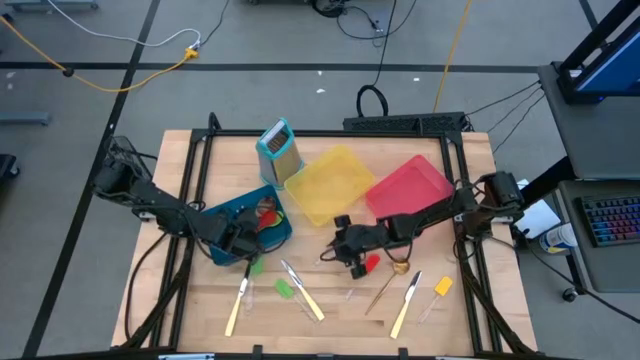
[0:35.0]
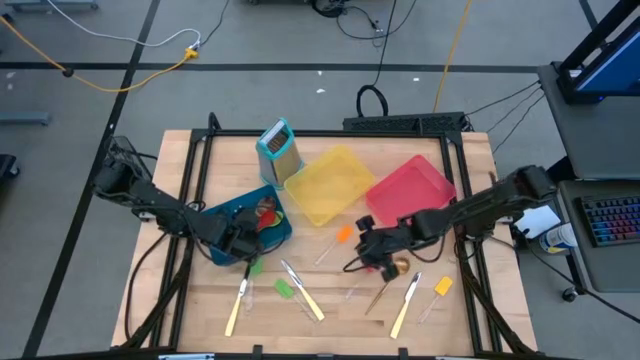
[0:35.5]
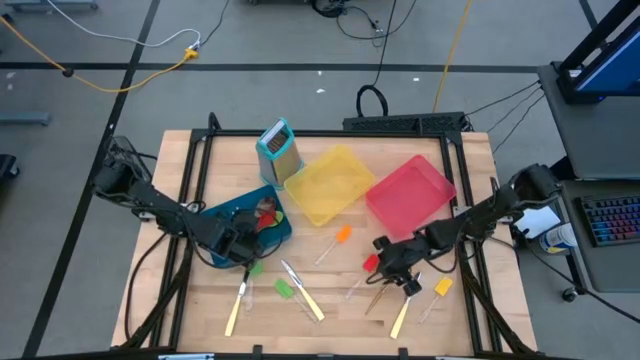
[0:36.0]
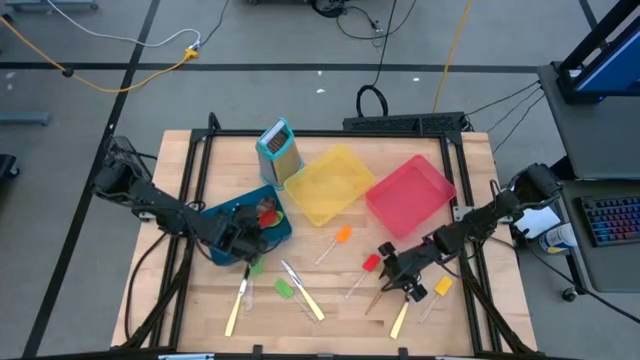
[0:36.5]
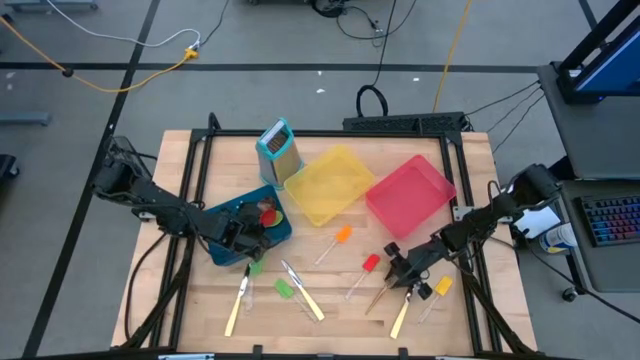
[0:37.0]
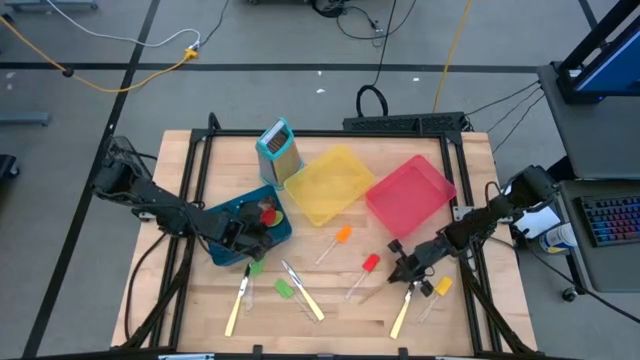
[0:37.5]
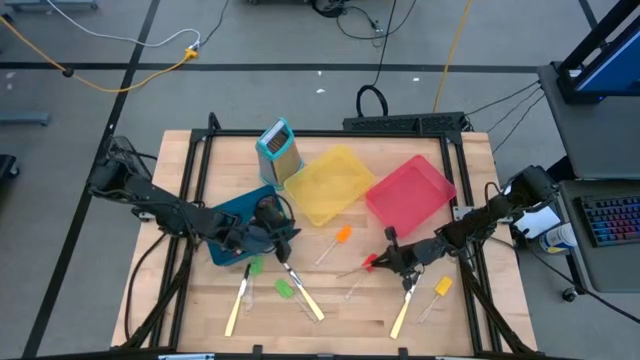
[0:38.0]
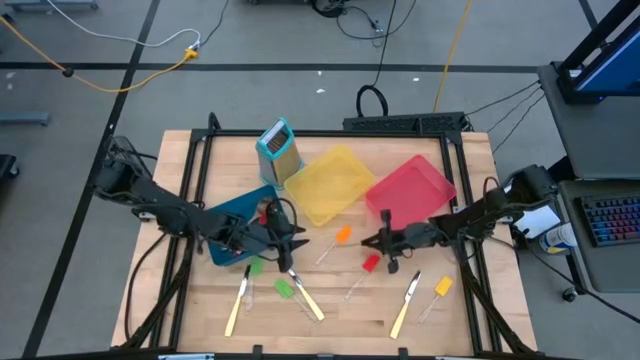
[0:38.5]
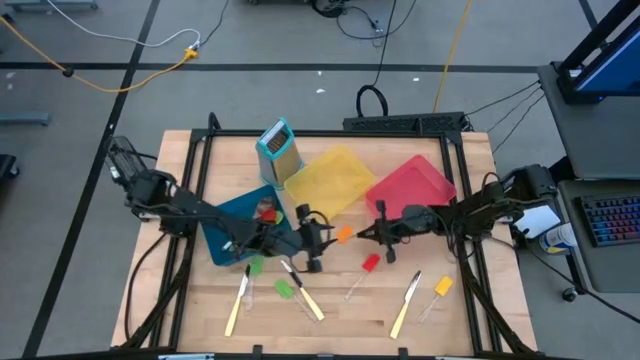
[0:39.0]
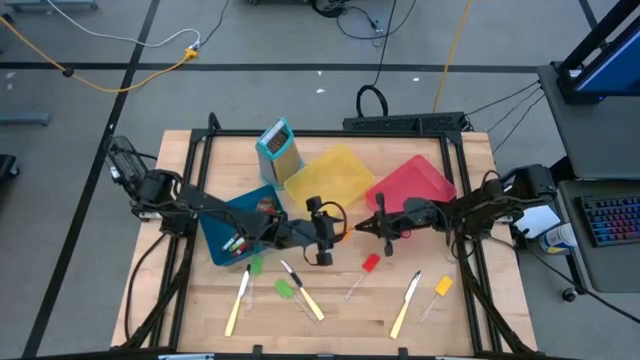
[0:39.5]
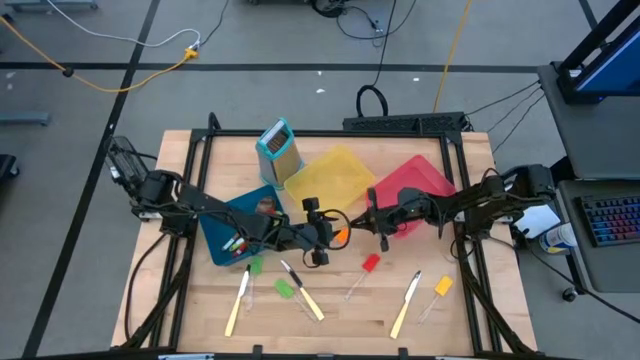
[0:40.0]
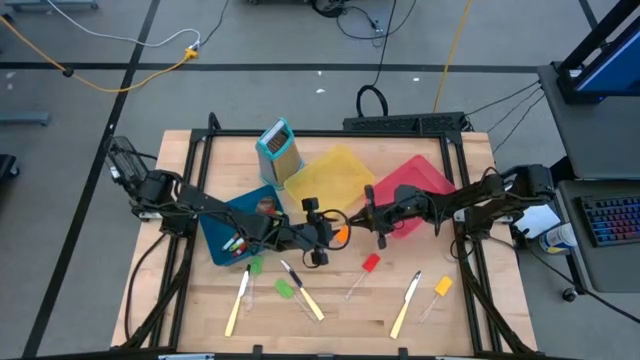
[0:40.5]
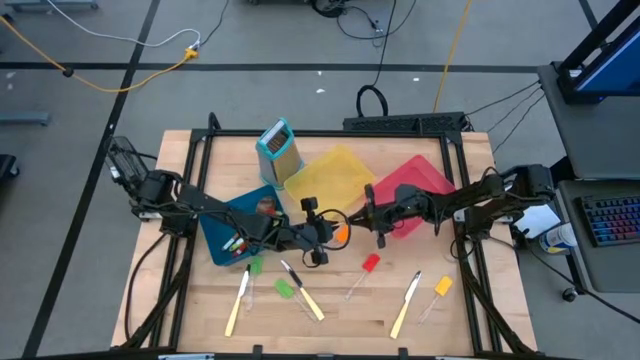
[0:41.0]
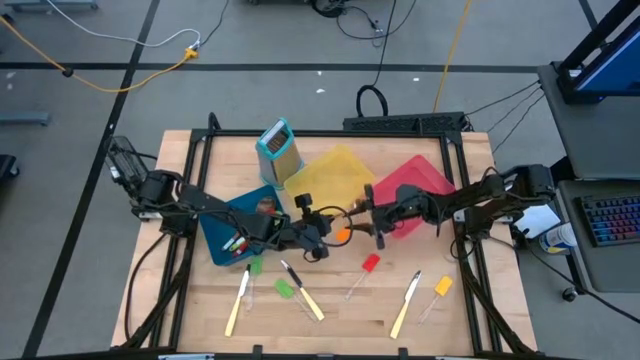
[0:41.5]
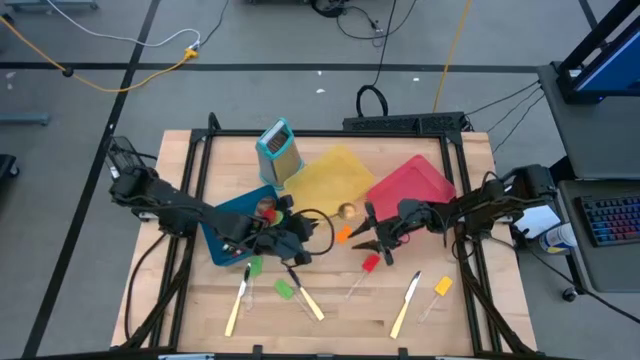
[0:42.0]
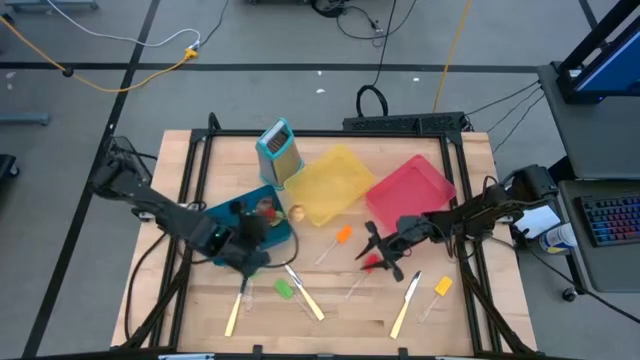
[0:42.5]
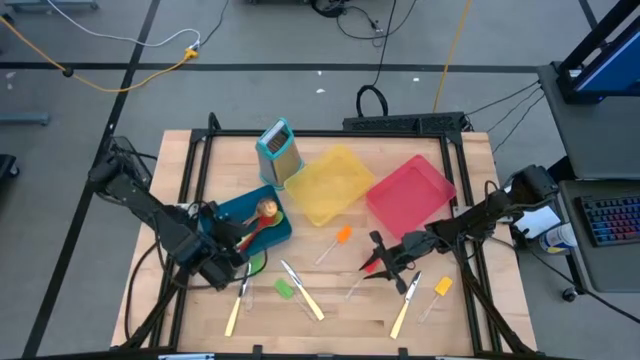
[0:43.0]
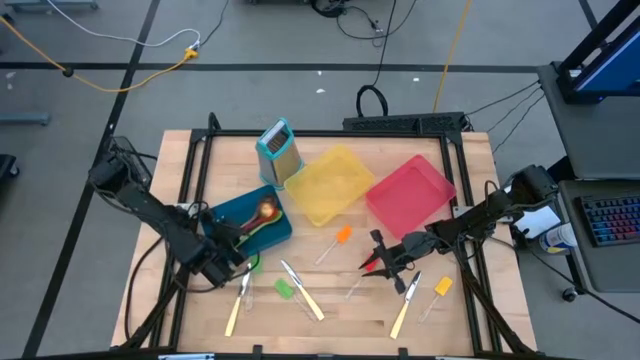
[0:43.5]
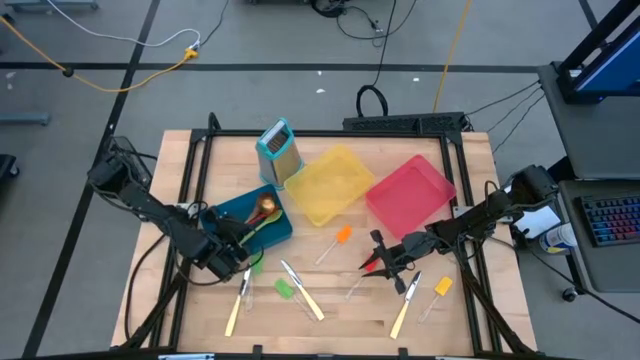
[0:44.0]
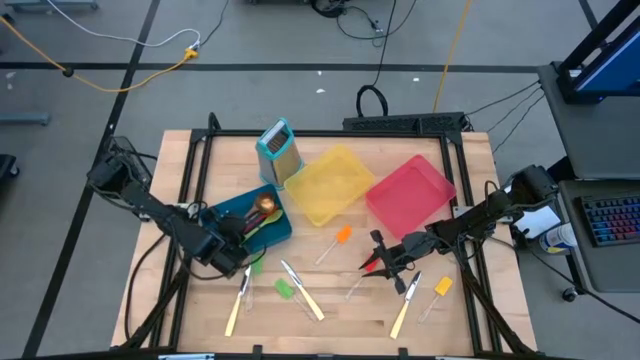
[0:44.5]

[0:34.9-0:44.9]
Task: Pick & Place Kitchen Items
Put the gold serving spoon into the blue bin

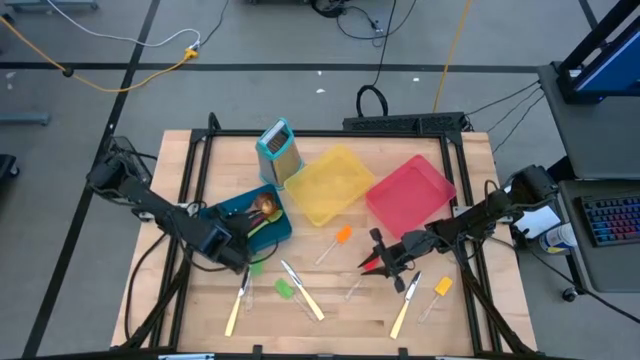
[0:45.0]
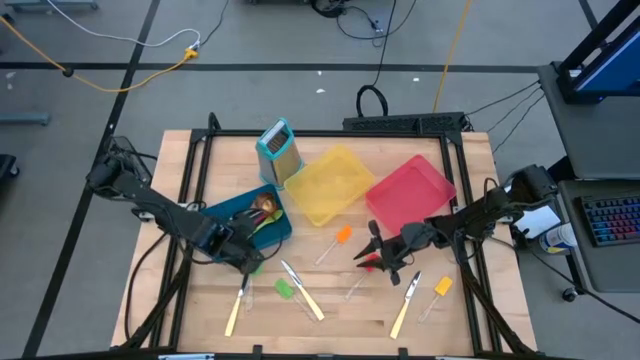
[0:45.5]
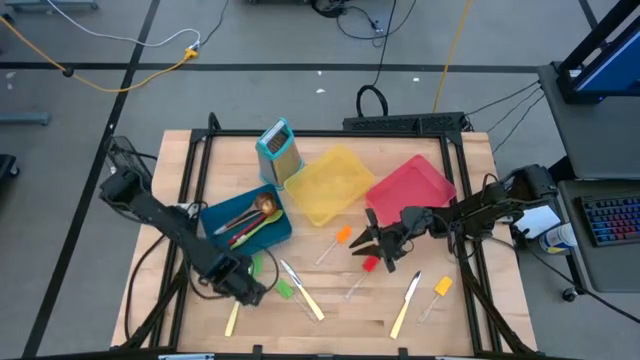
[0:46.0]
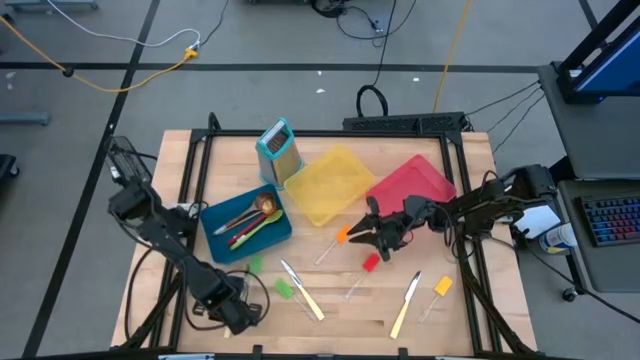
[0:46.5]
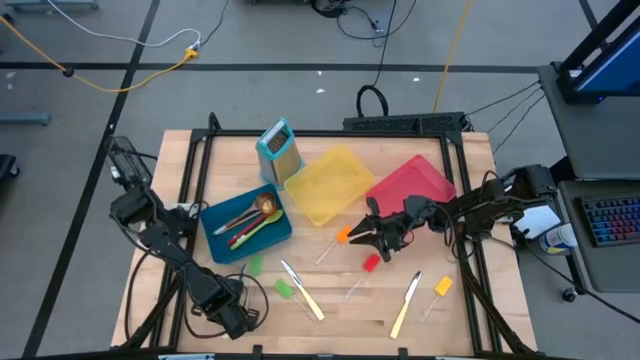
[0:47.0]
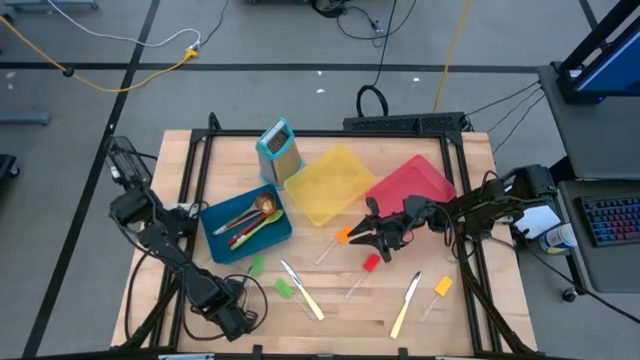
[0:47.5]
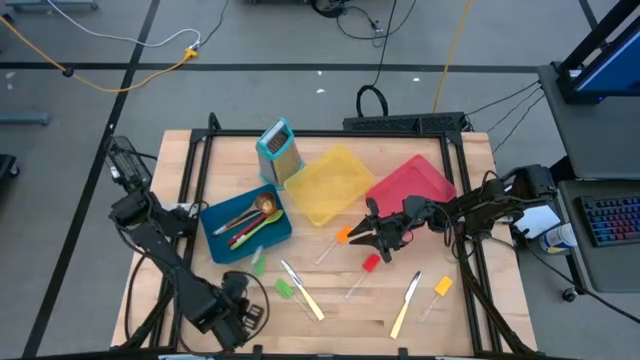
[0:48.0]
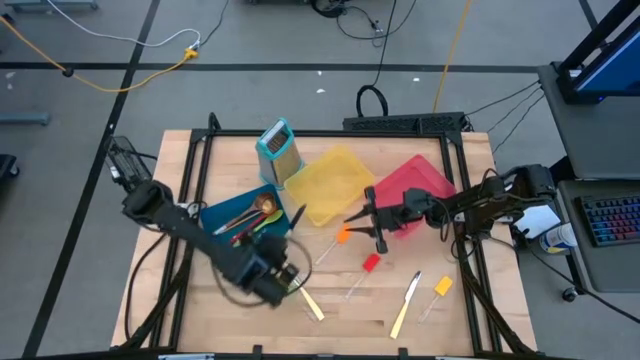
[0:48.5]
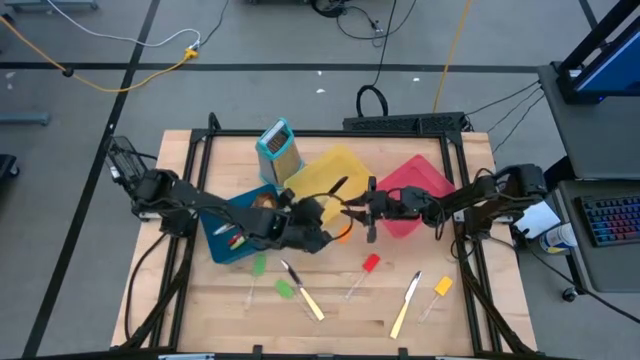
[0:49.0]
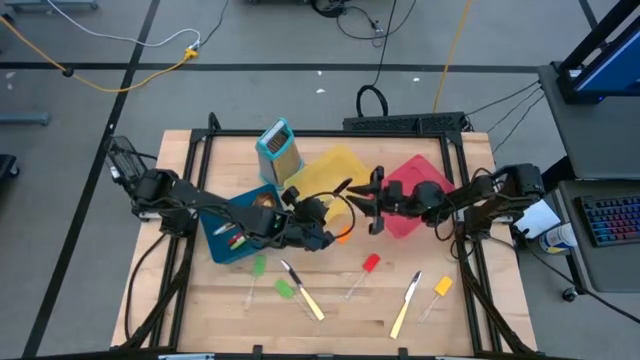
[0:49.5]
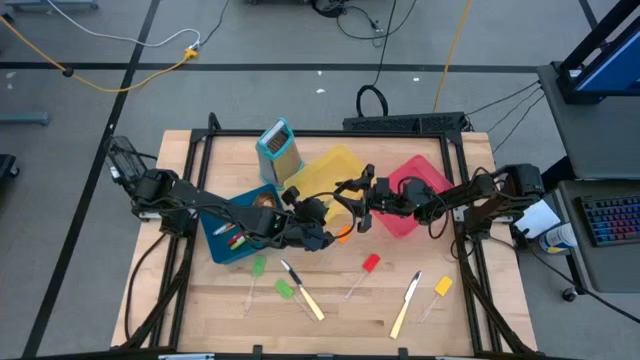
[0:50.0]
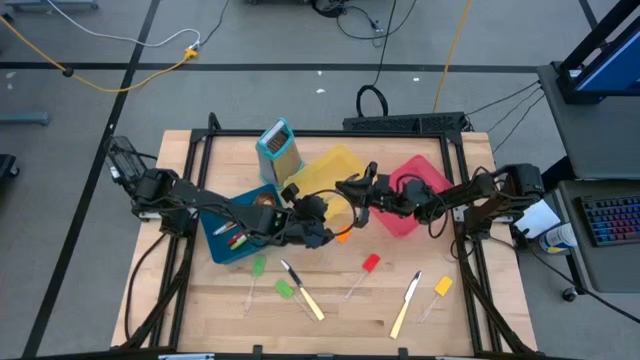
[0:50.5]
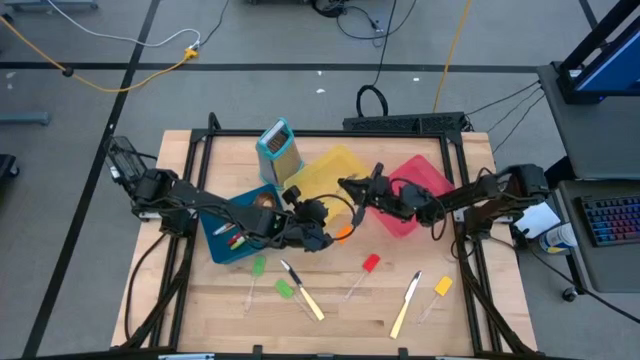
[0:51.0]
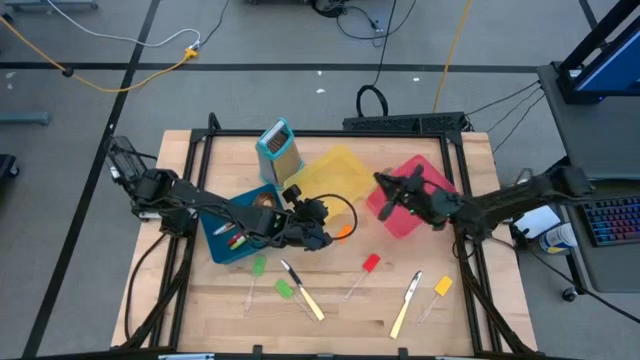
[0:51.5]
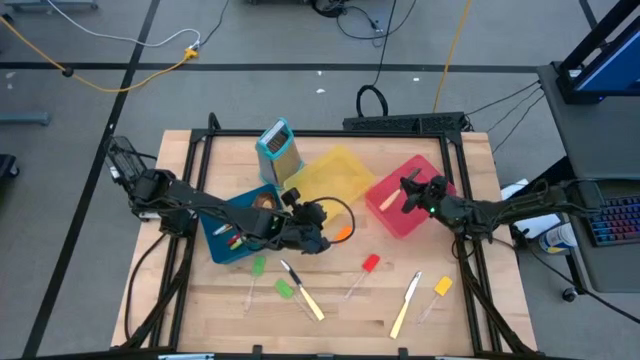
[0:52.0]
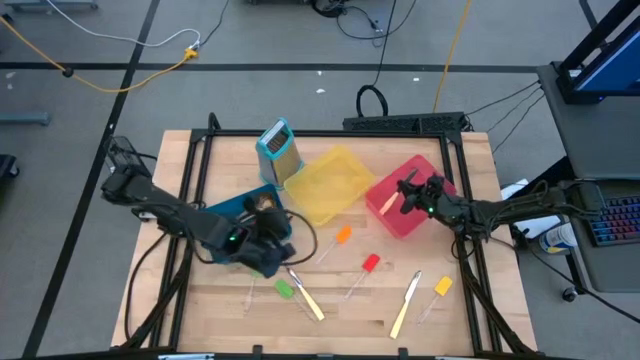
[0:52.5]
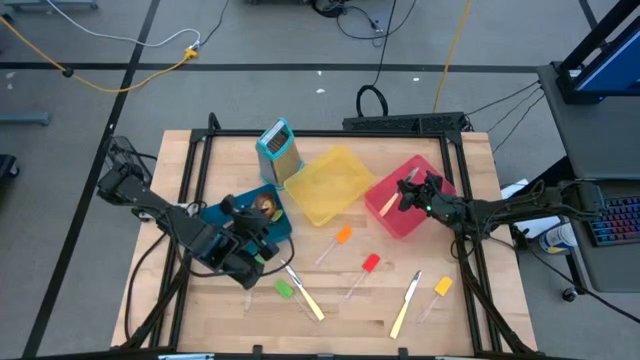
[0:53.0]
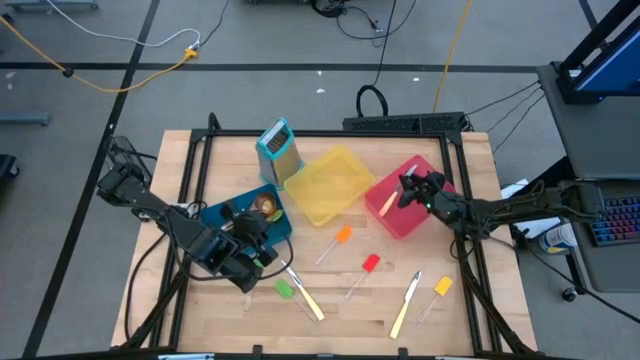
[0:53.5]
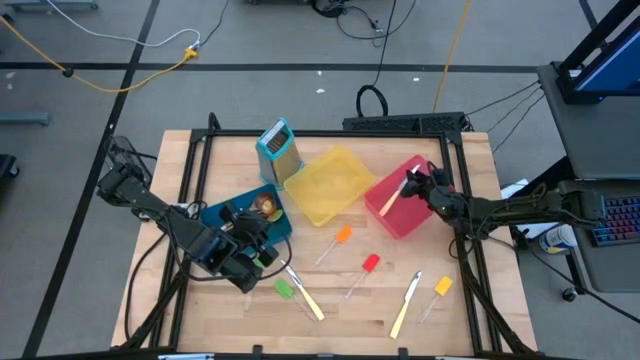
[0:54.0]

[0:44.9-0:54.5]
Put the yellow table knife into the red bin

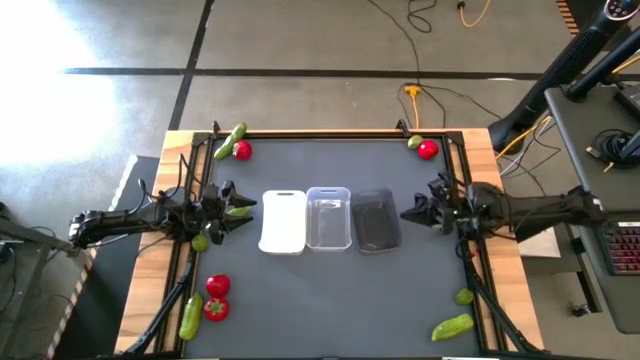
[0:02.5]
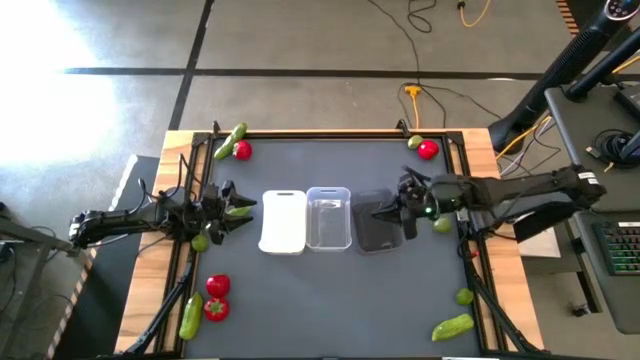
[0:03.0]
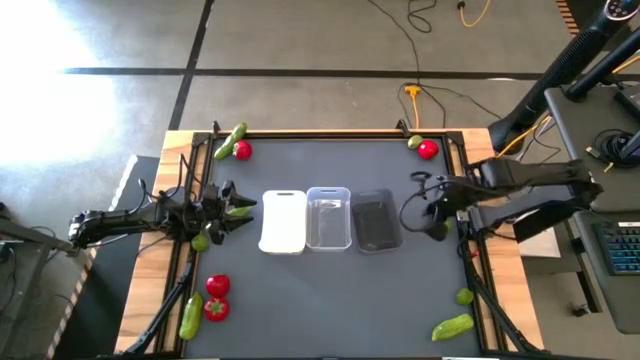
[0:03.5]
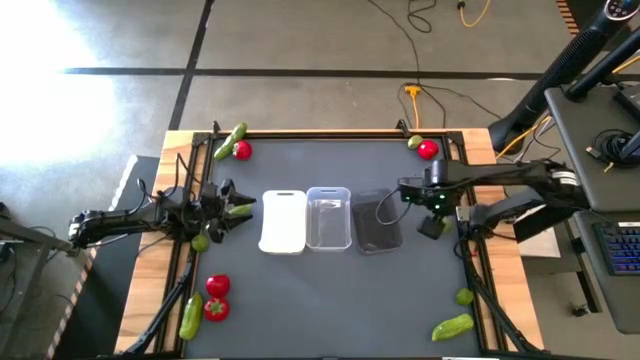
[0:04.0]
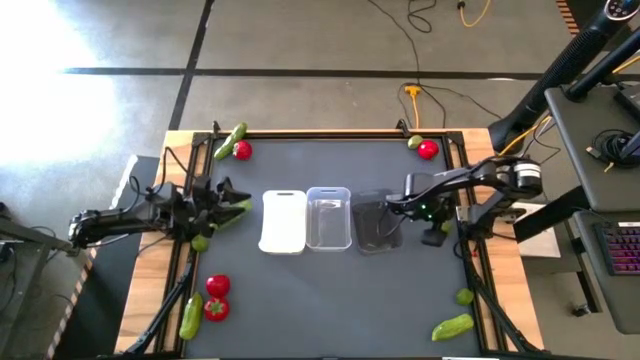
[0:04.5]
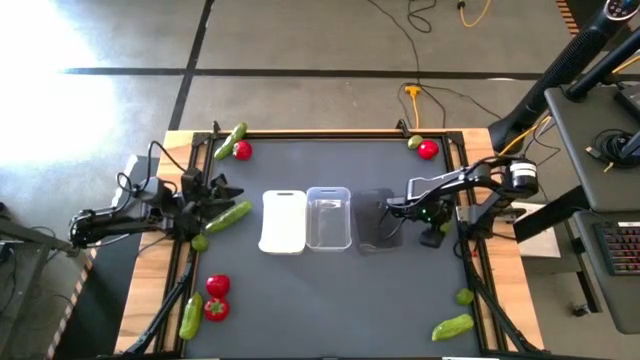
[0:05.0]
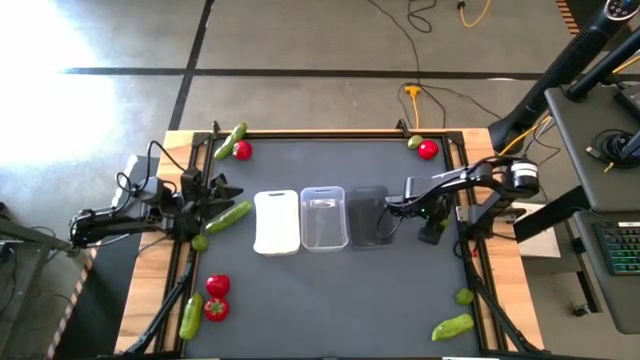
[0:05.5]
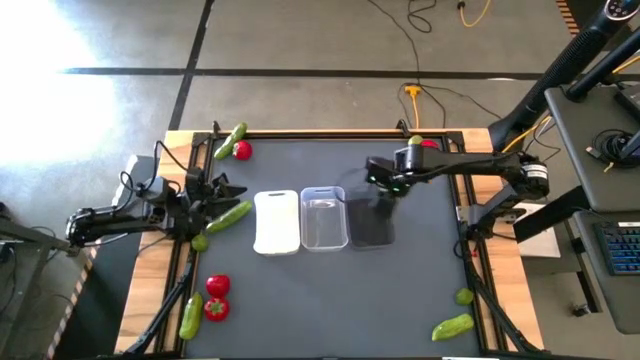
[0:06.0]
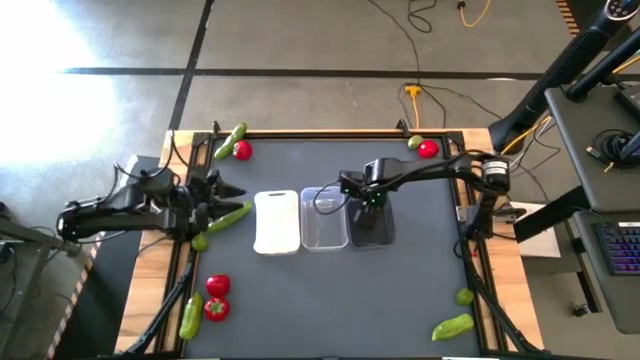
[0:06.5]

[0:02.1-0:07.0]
Task: Sort produce into baskets
Put the green lime into the black bin
